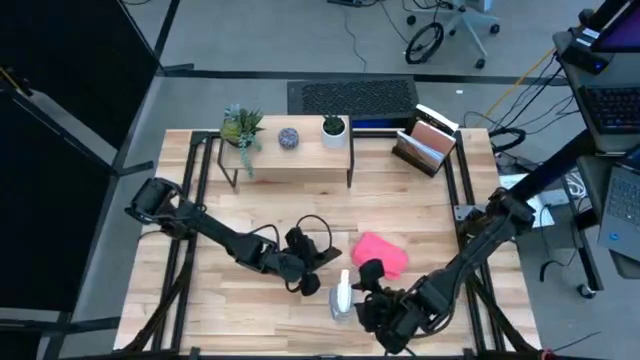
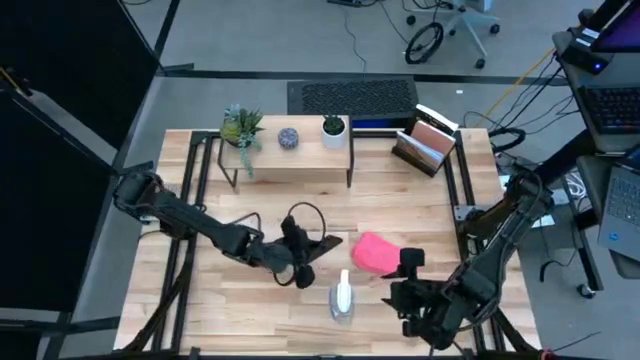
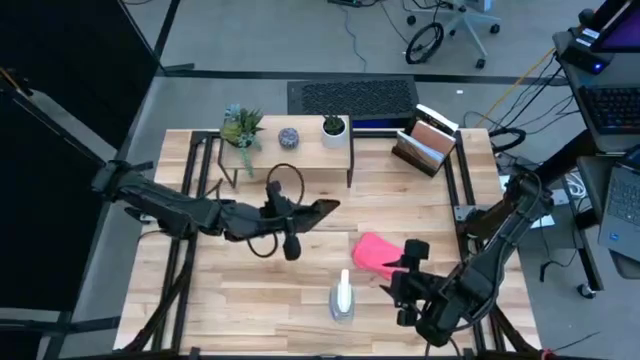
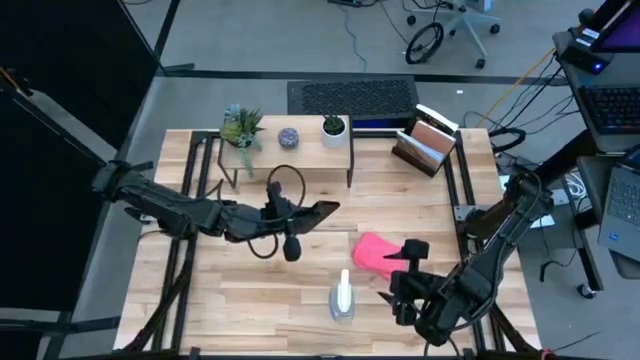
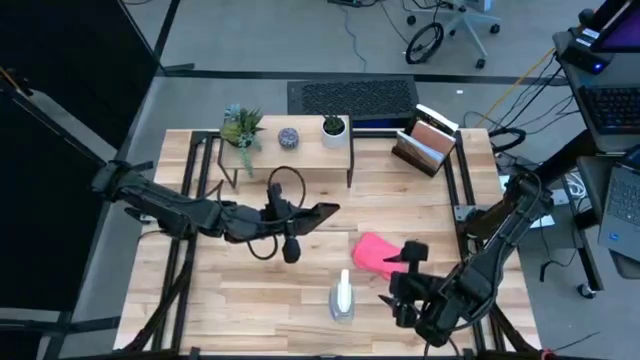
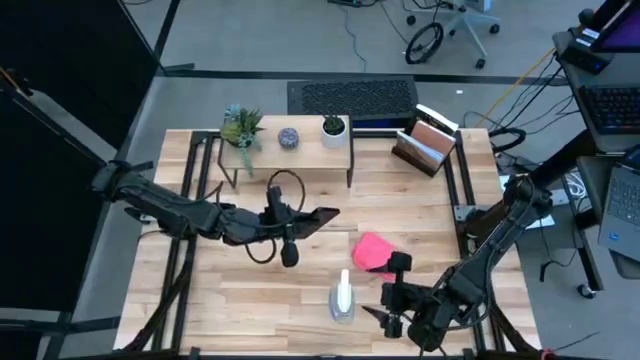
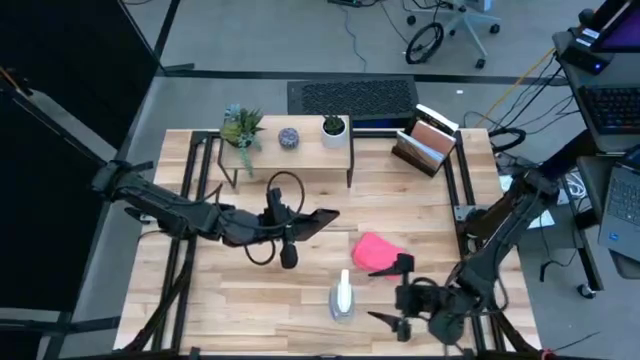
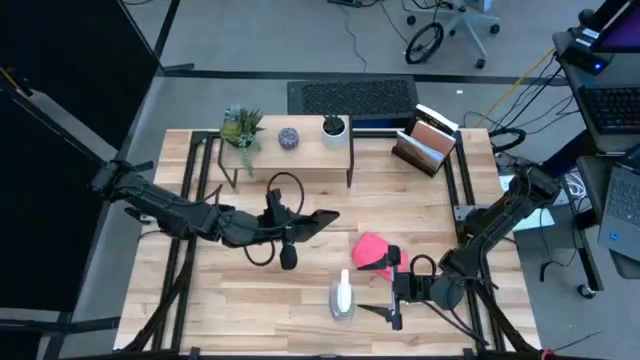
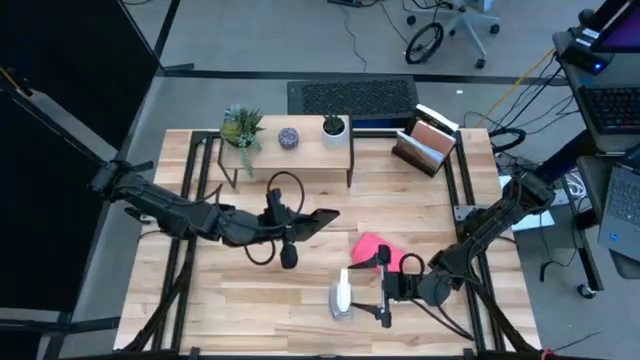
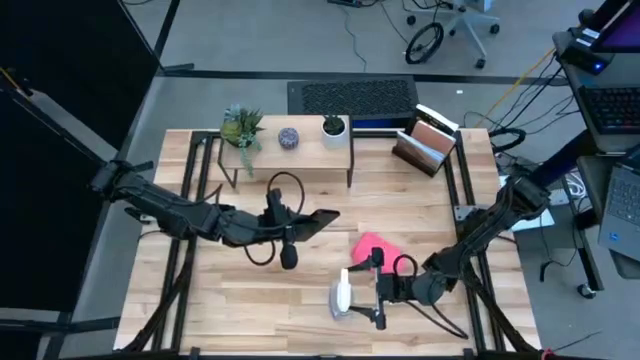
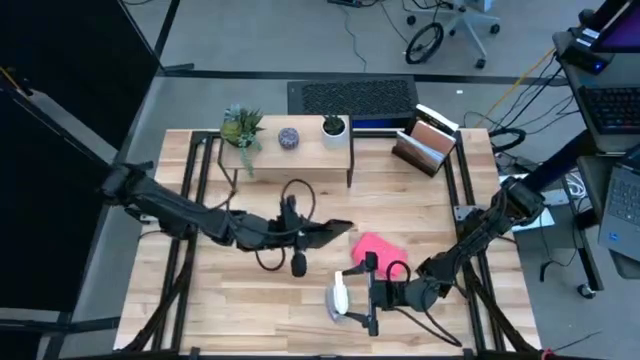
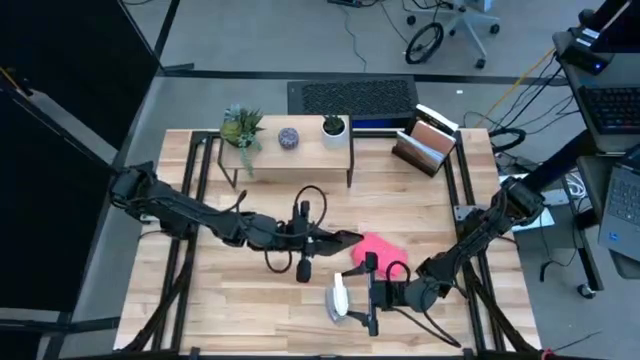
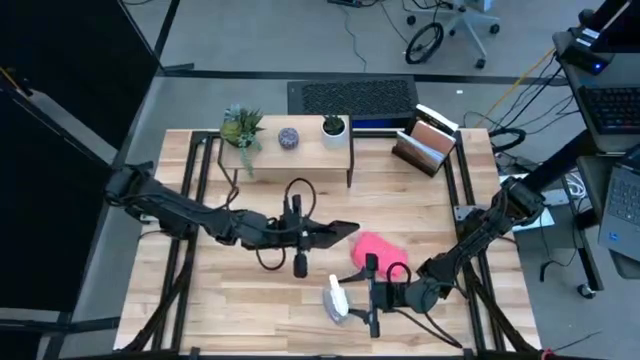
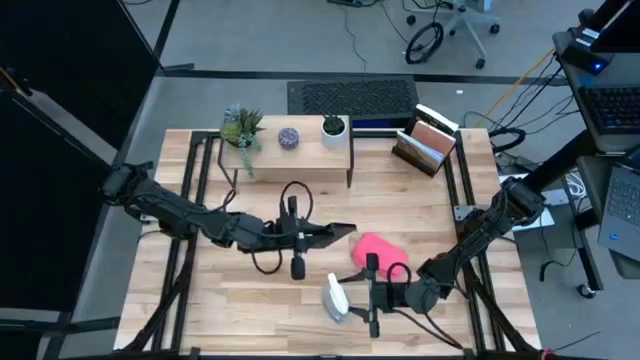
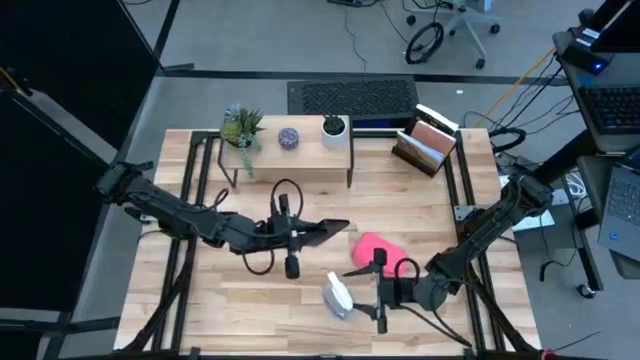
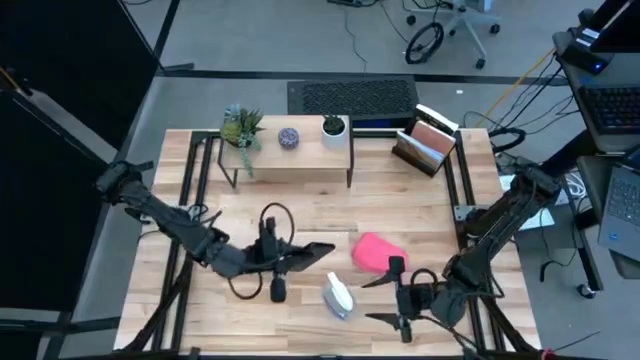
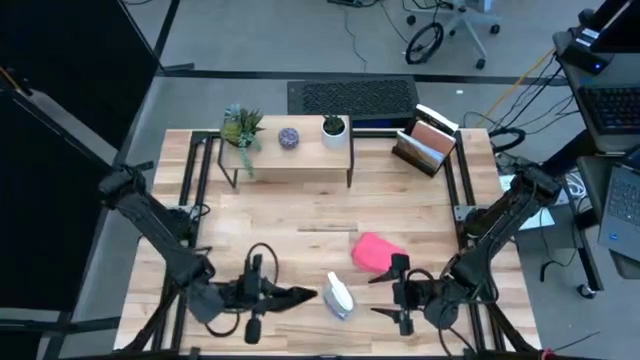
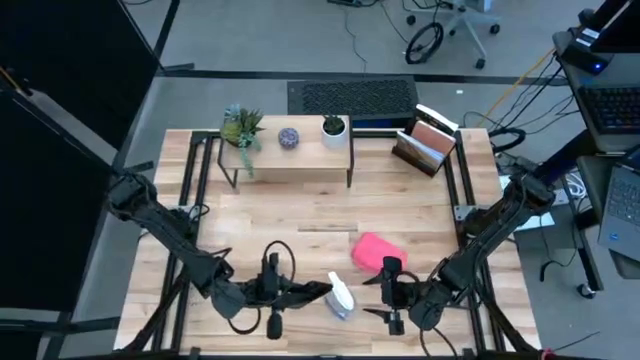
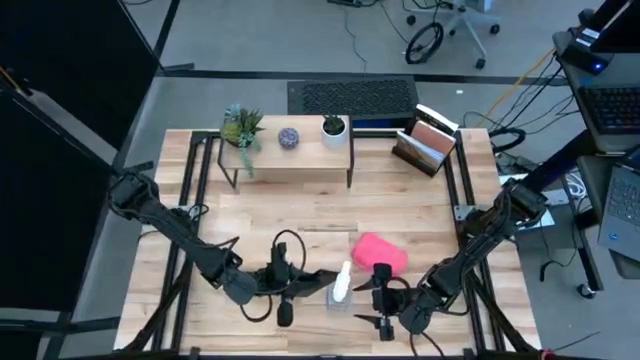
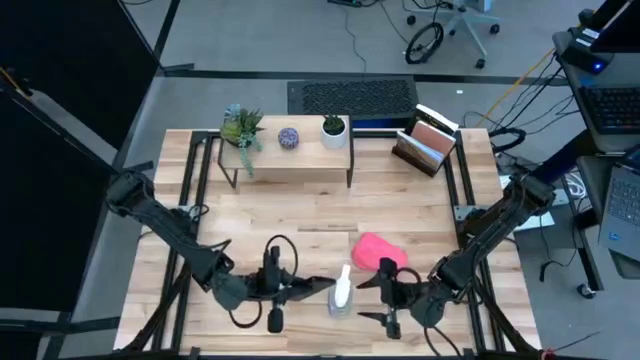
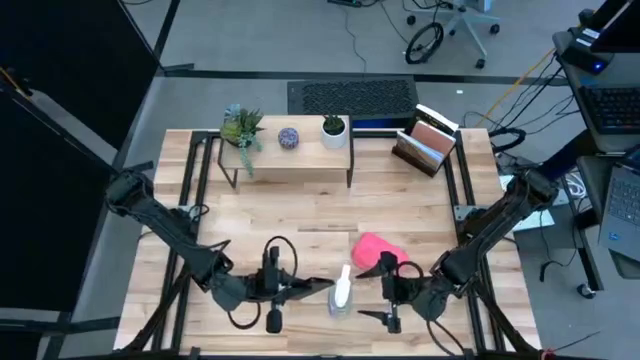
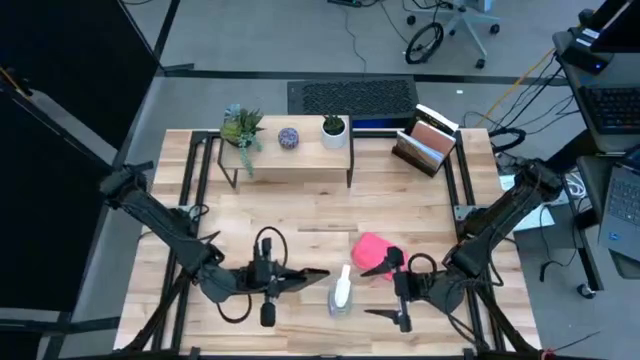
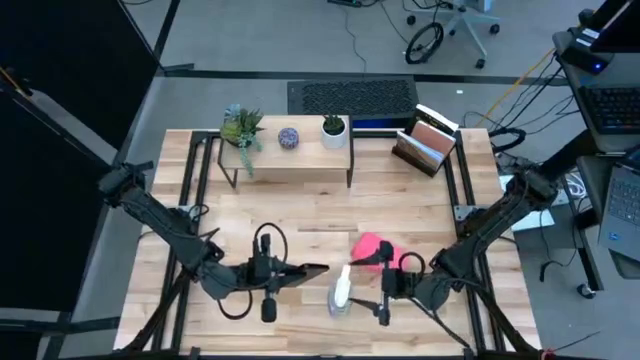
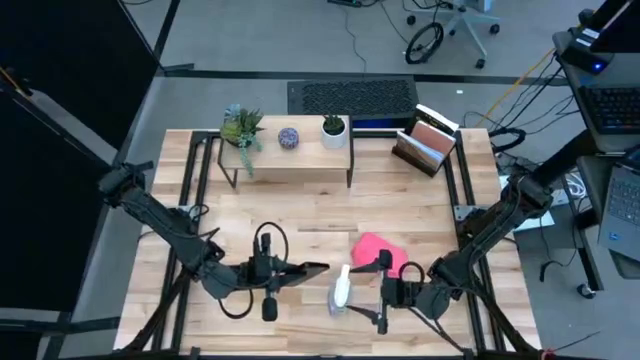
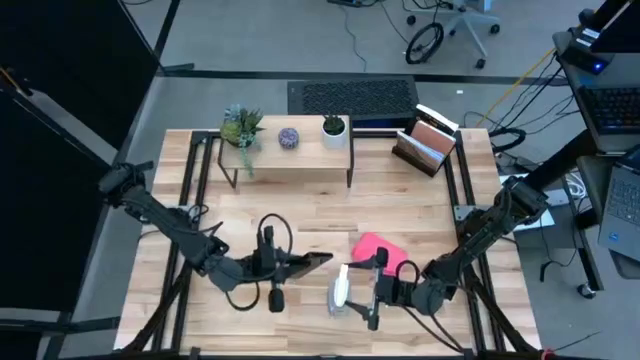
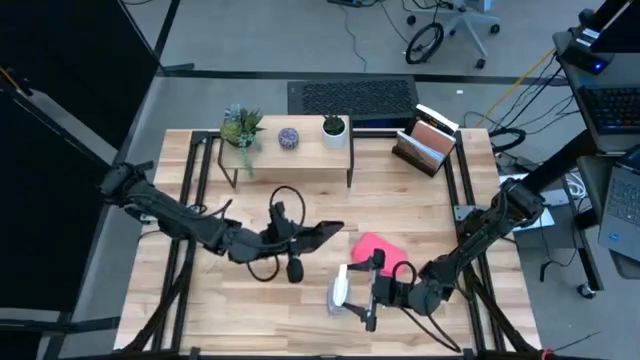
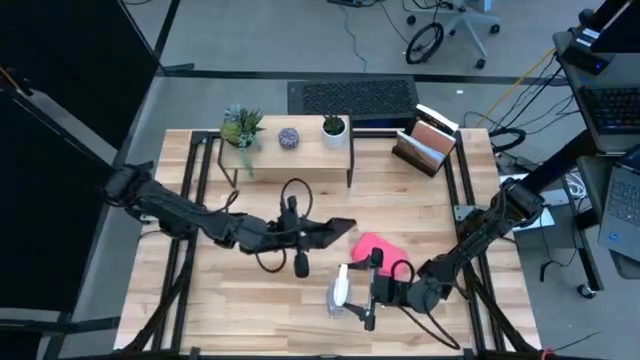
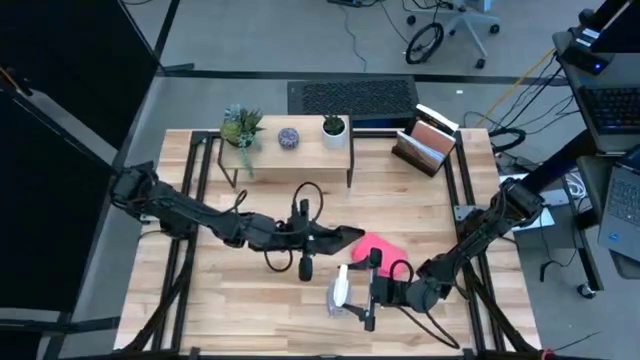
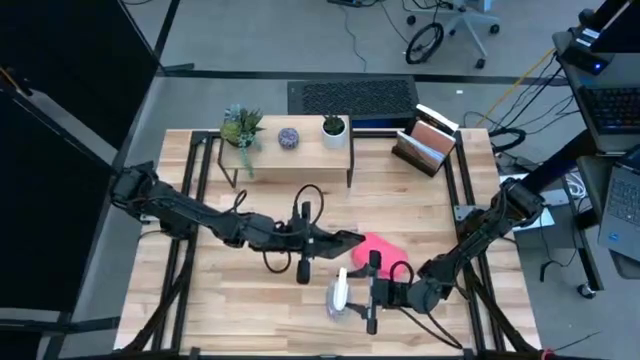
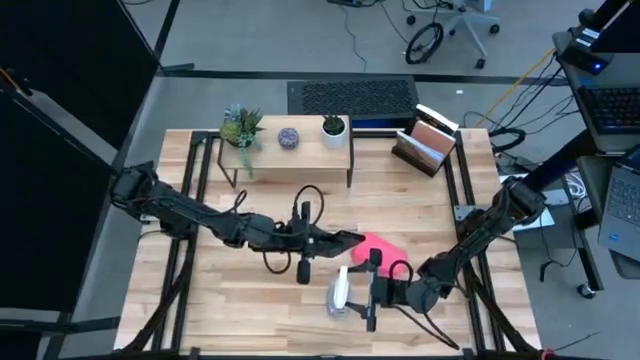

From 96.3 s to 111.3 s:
Task: Apply microfiber cloth
Spray the back of the cellphone using the spray bottle

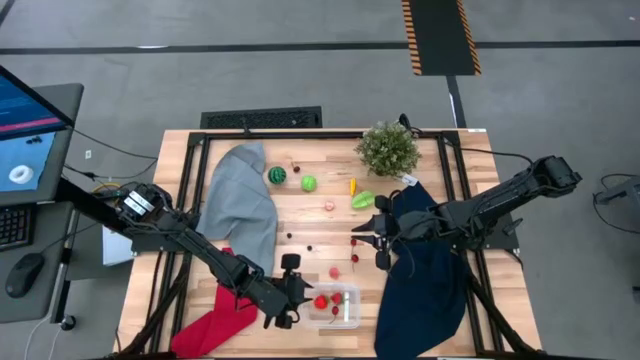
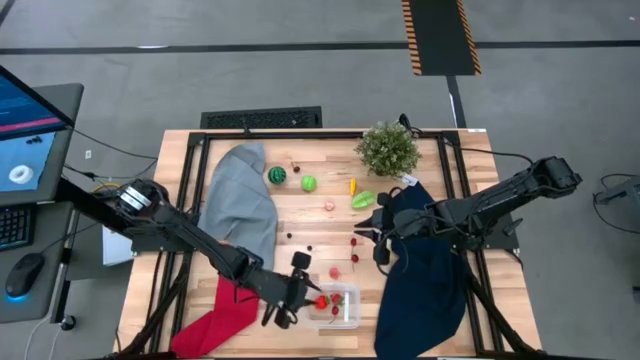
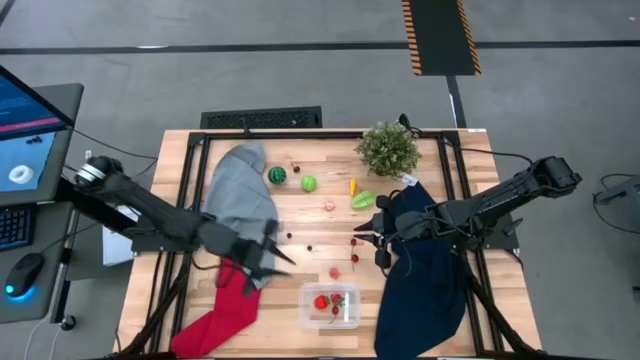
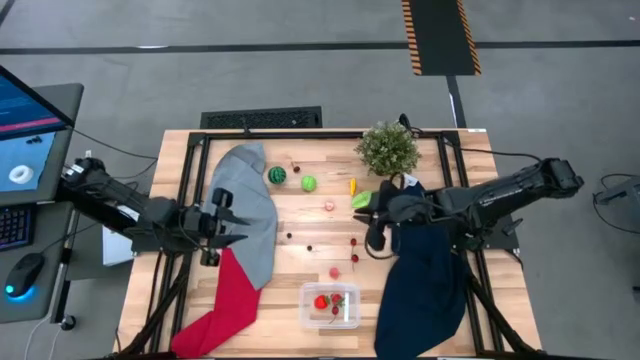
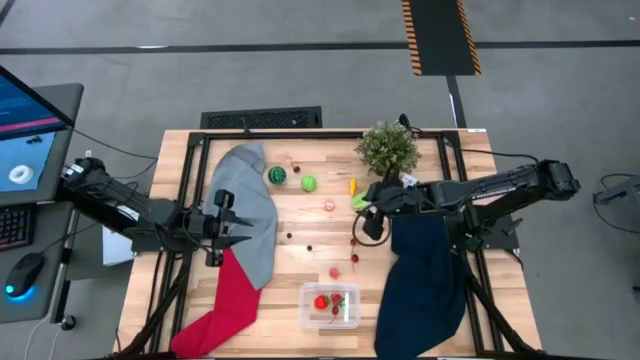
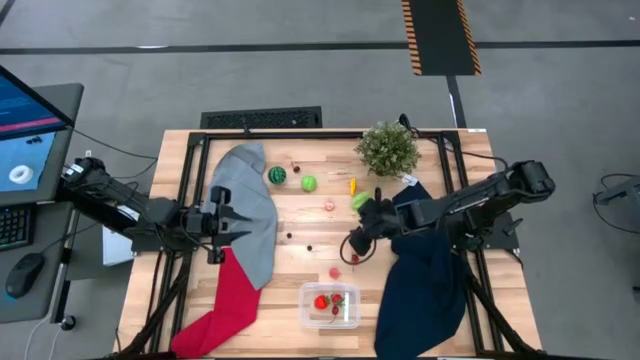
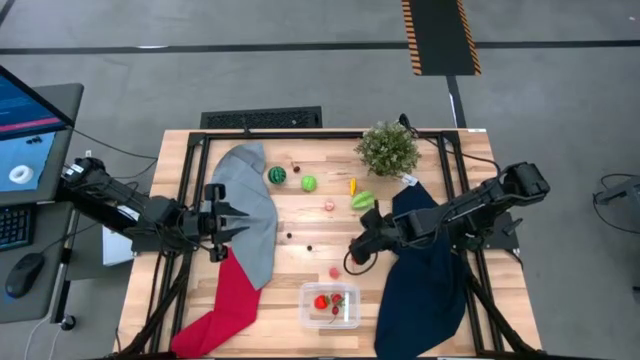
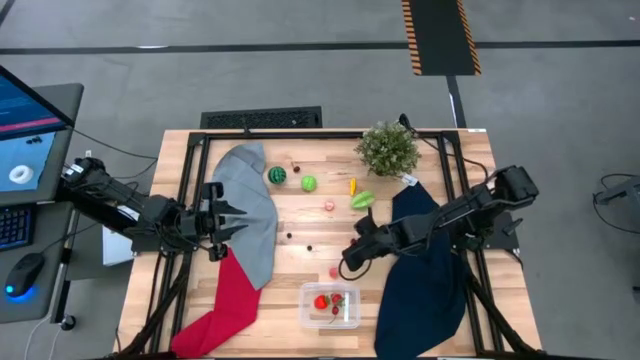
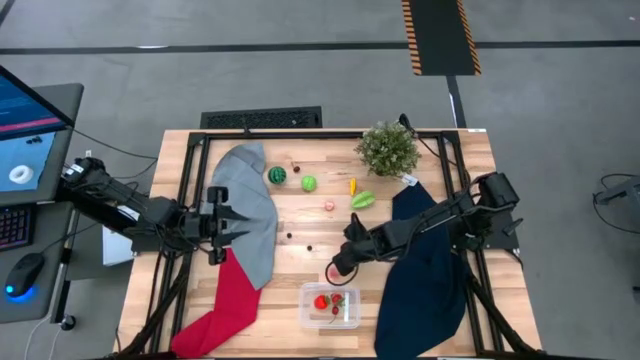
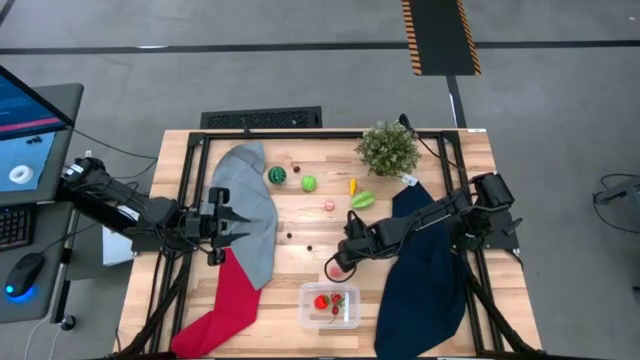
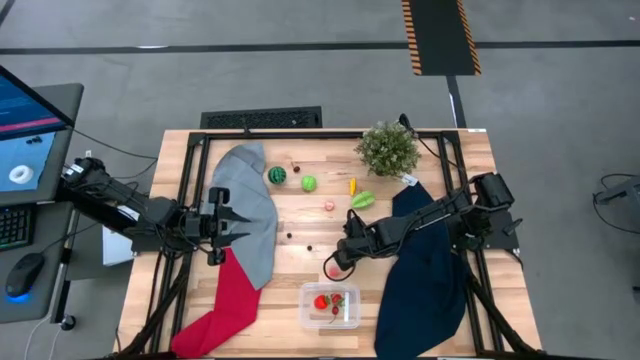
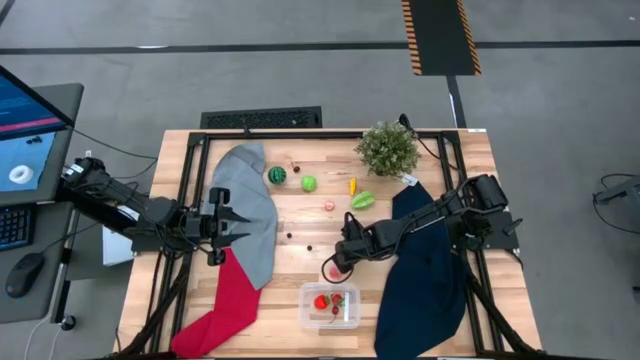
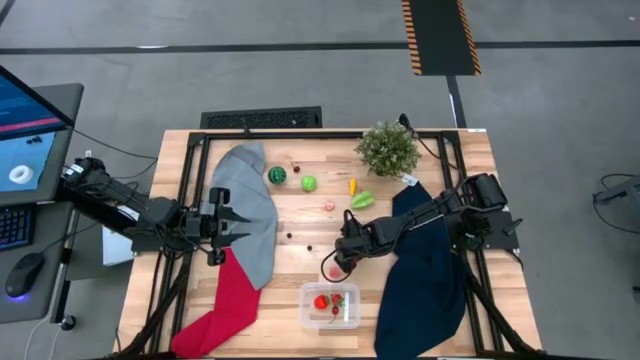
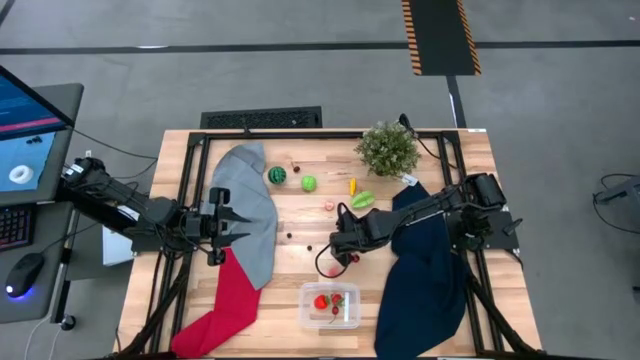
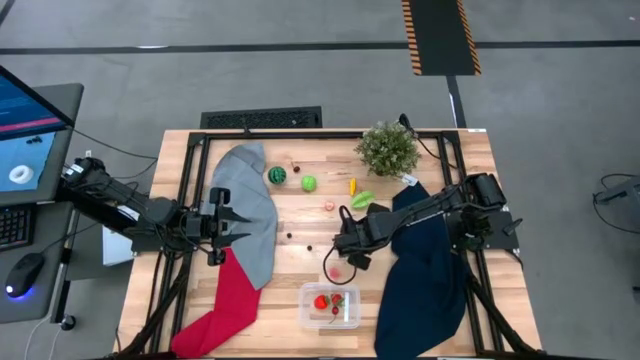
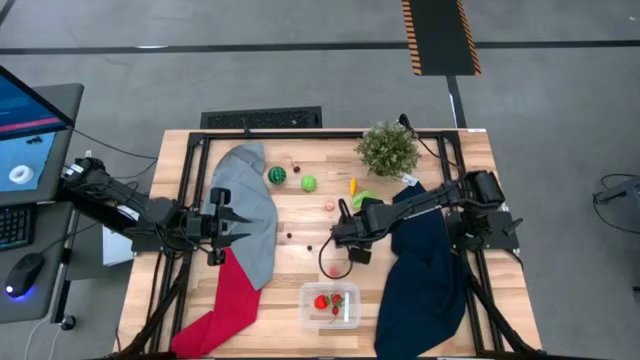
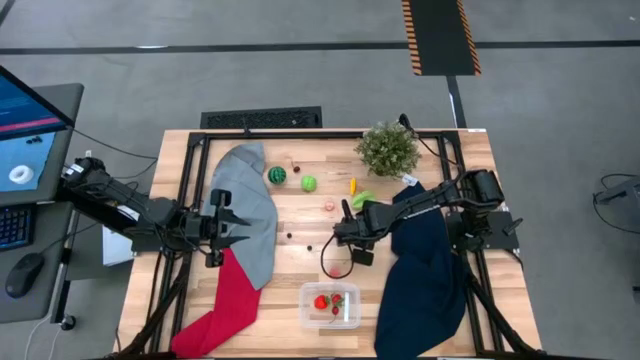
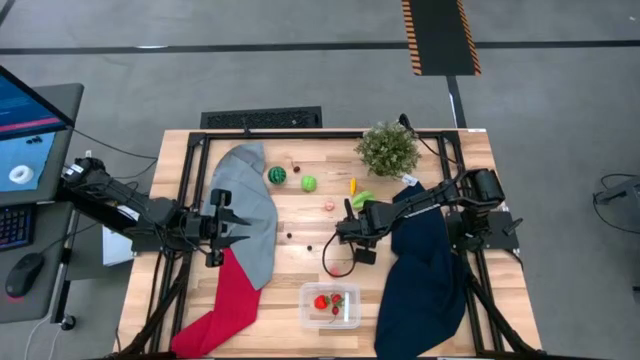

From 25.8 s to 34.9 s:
Task: Pick and placing Produce into tupperware
Put the cherry into the transparent bin
